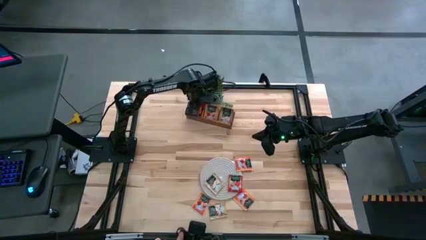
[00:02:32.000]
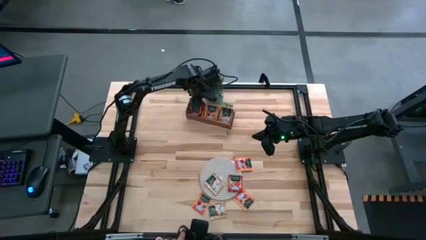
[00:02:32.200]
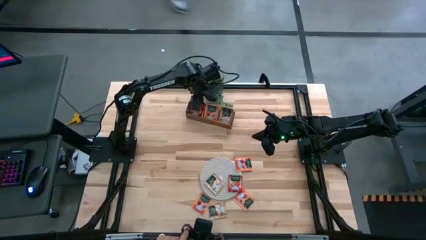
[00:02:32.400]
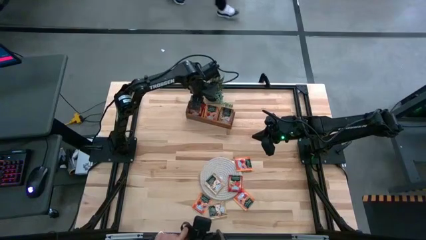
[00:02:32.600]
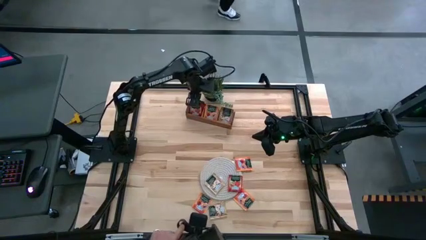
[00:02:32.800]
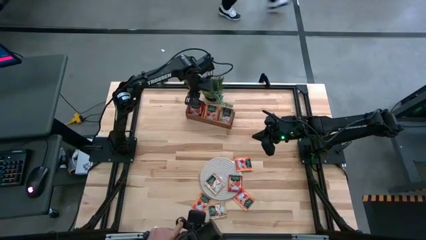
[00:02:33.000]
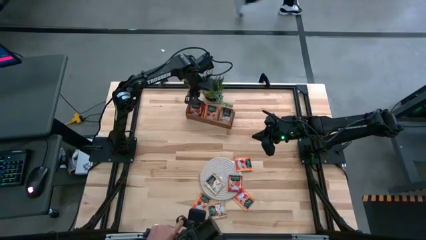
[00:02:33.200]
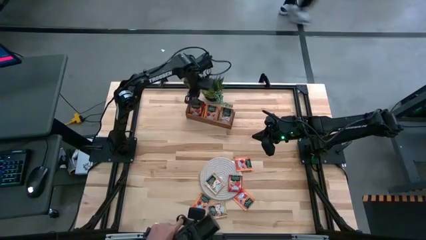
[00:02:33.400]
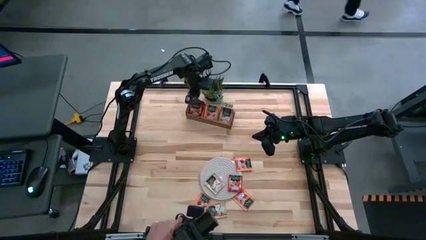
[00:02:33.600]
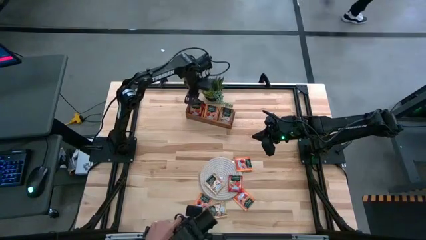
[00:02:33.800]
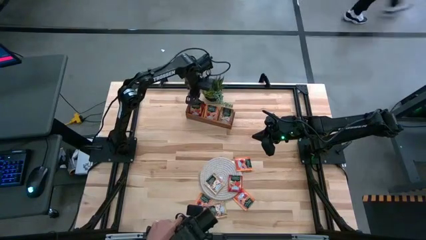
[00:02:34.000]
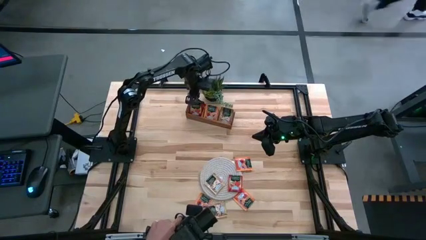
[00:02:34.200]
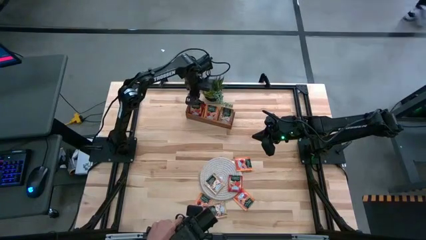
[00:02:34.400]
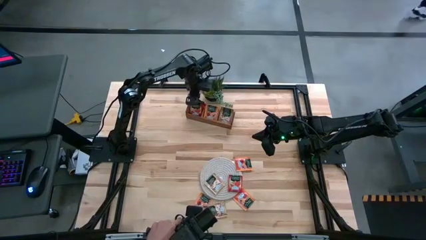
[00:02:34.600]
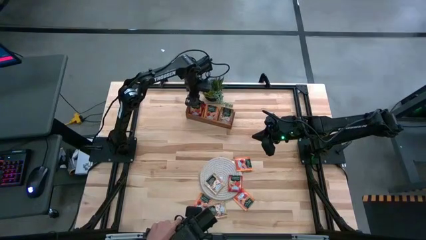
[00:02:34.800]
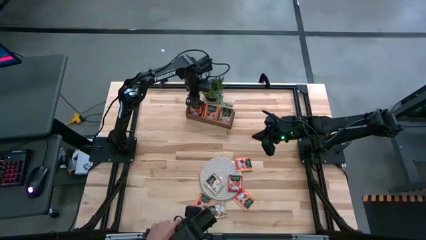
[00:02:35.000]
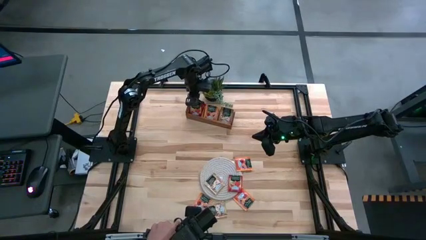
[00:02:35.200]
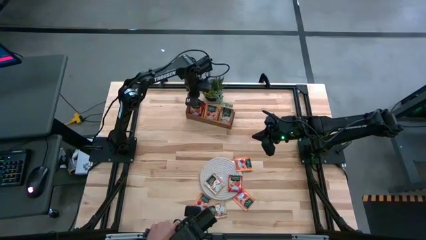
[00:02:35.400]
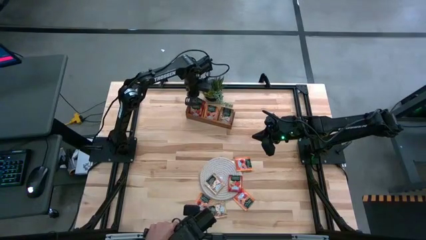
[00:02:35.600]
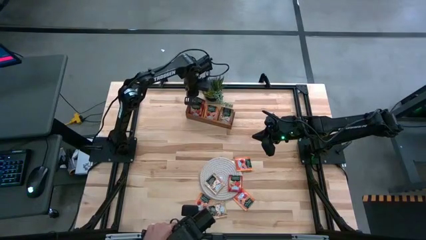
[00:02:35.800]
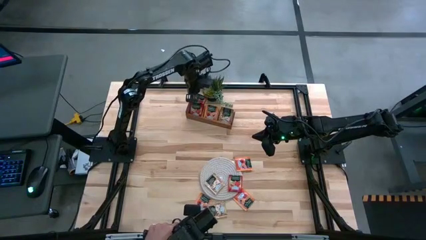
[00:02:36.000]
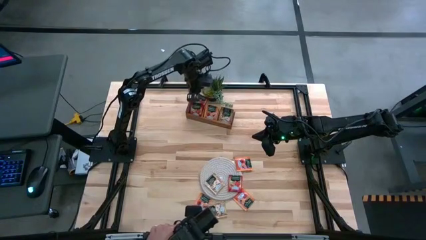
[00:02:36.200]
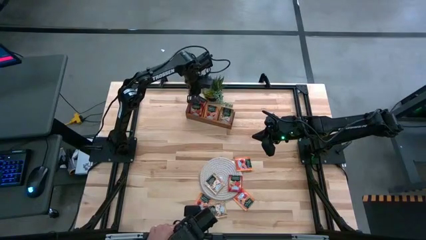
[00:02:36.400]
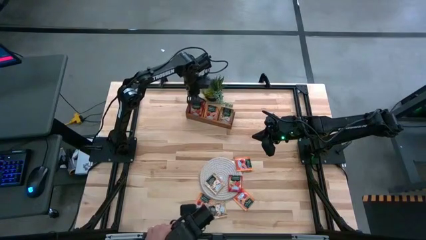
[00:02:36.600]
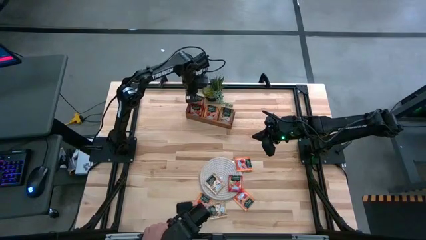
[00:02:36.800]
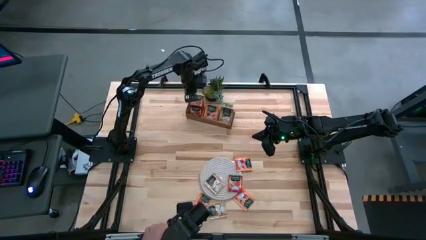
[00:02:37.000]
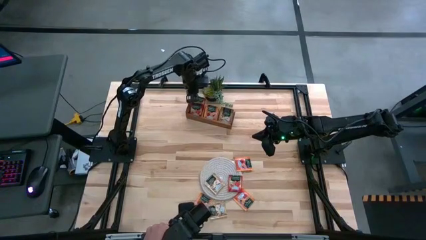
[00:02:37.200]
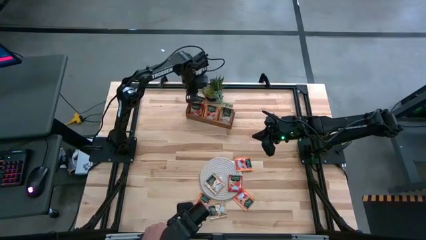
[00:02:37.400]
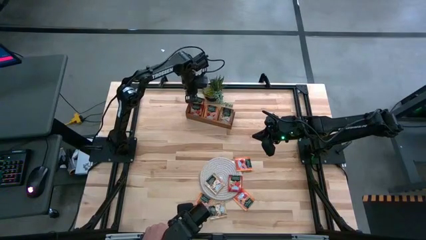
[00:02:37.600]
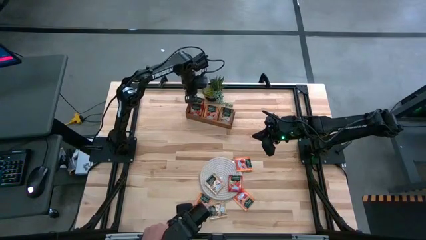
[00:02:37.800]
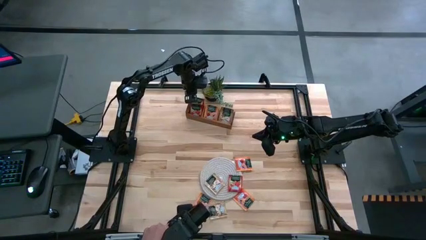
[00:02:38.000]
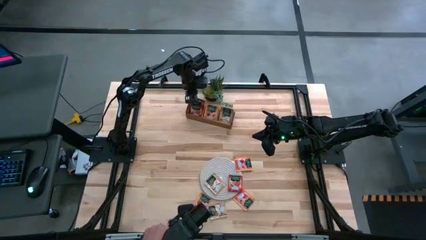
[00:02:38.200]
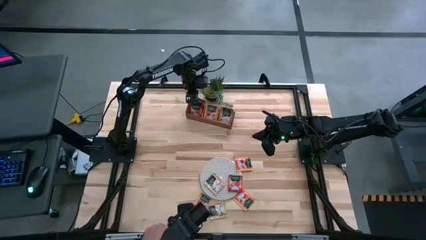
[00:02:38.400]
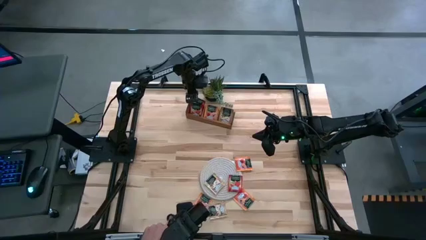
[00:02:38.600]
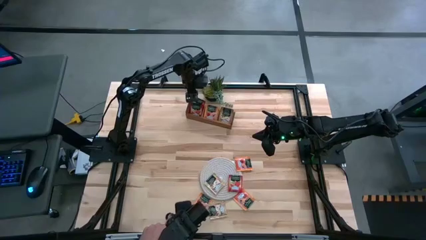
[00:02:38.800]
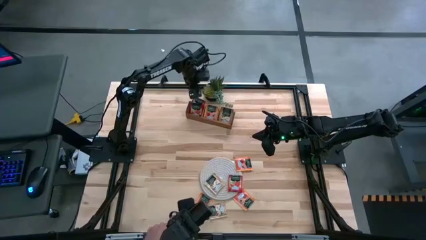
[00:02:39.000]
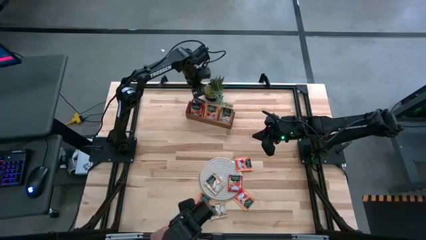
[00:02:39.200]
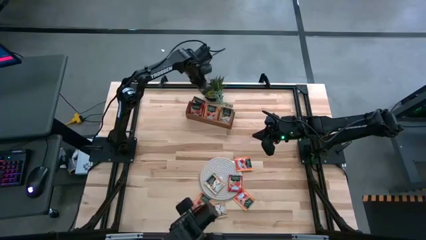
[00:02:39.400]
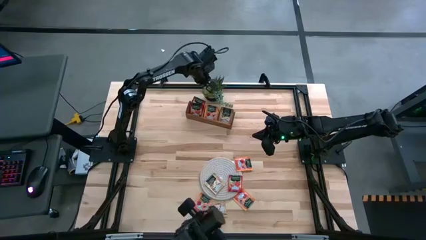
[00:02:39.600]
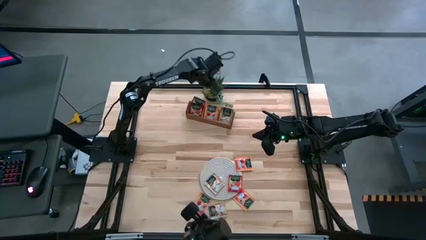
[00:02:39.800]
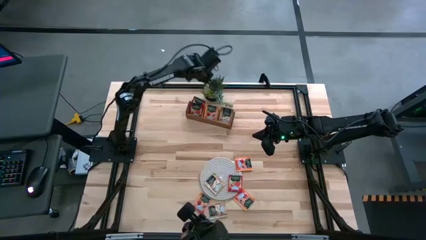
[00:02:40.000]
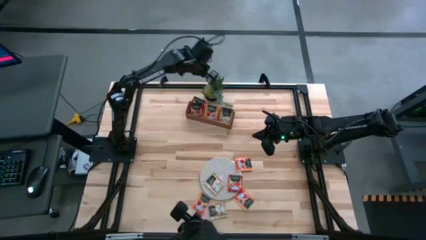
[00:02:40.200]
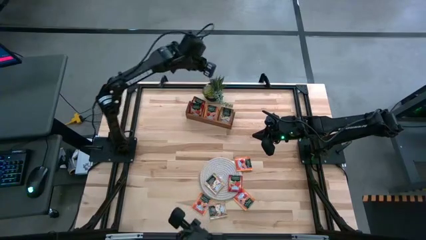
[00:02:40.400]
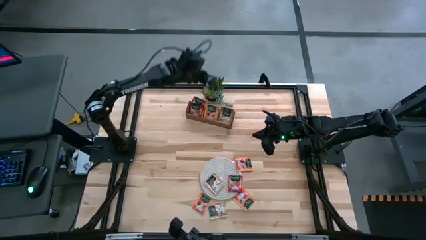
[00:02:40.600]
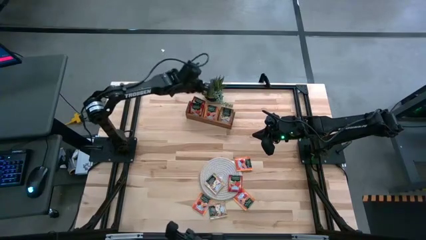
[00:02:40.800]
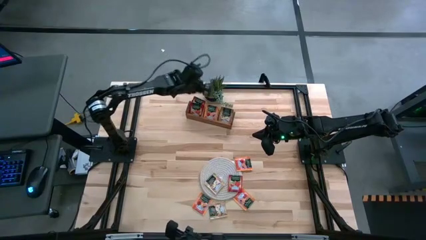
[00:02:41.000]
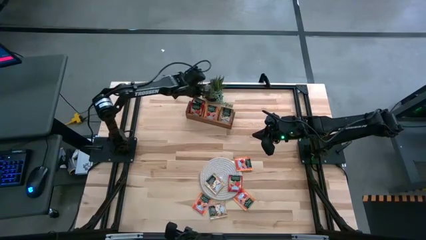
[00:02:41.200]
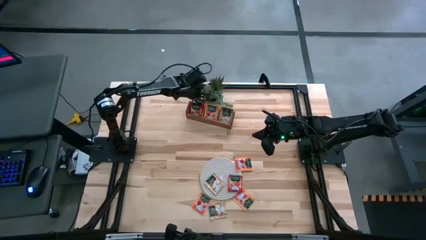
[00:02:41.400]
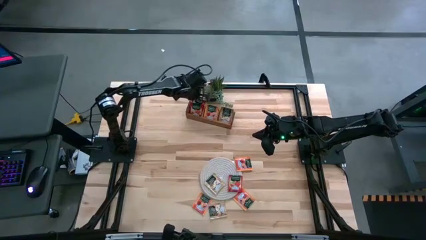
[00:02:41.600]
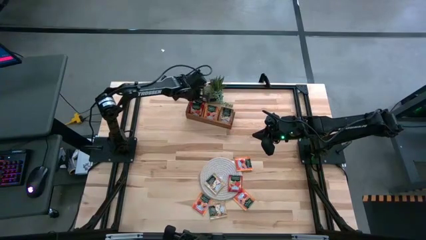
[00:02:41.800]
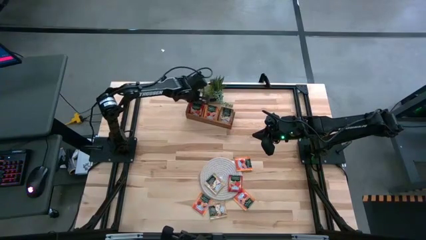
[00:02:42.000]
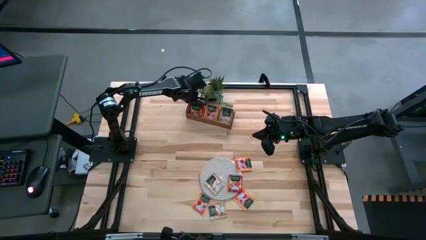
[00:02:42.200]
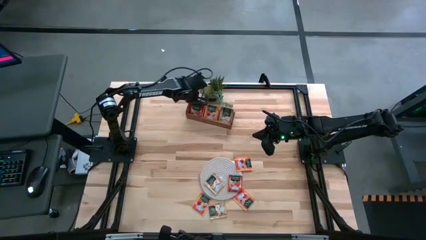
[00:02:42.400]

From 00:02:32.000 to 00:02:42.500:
Task: Pick & Place Tea
Adjust the red tea bags in the left section of the wooden organizer

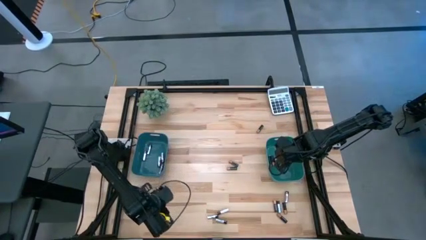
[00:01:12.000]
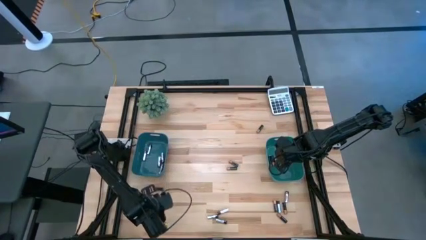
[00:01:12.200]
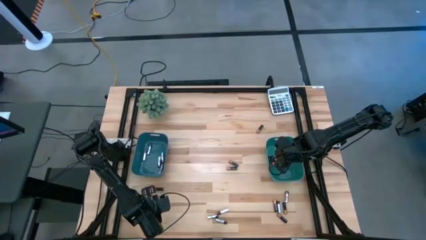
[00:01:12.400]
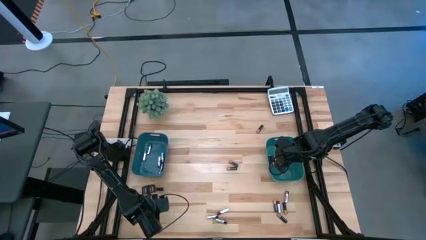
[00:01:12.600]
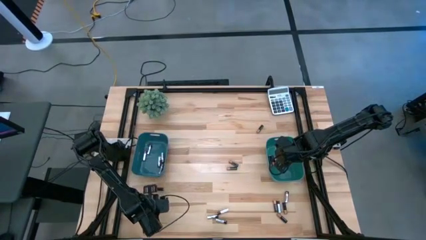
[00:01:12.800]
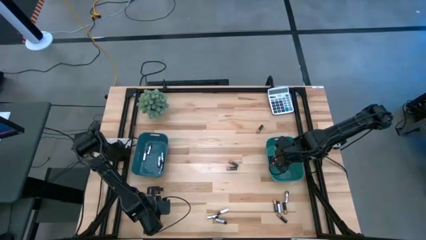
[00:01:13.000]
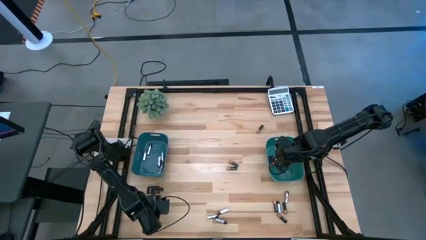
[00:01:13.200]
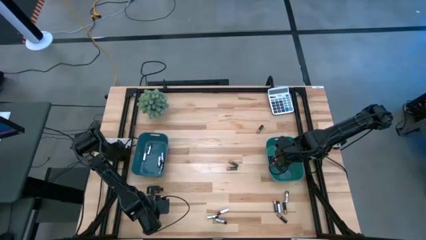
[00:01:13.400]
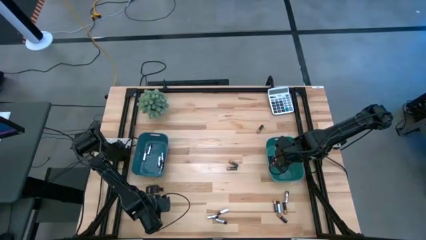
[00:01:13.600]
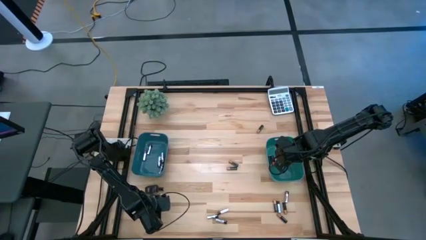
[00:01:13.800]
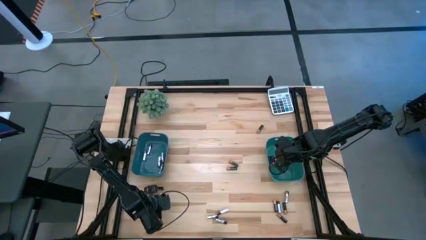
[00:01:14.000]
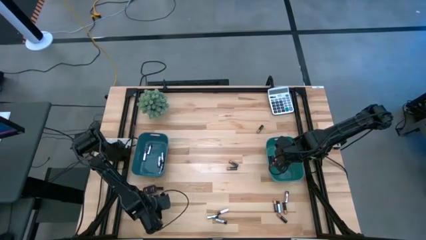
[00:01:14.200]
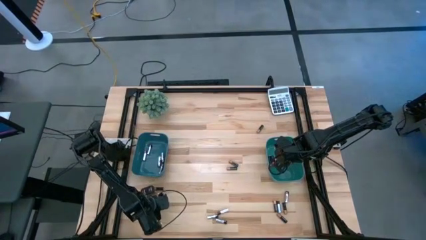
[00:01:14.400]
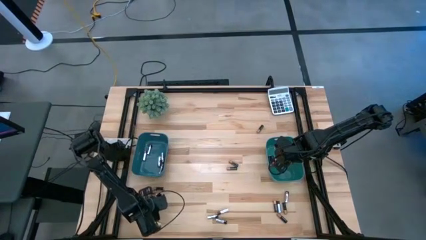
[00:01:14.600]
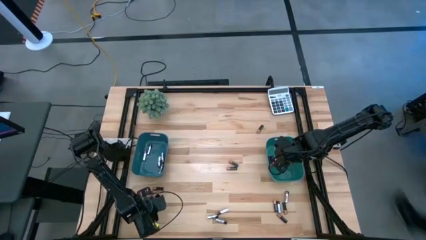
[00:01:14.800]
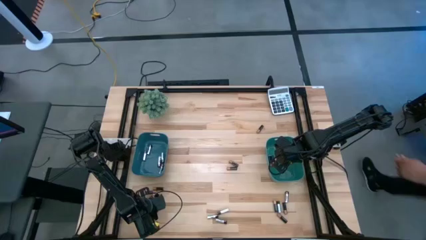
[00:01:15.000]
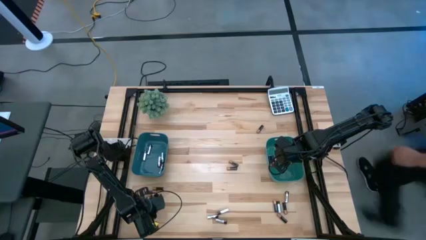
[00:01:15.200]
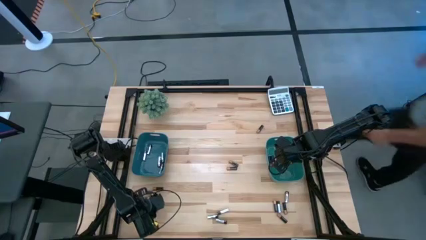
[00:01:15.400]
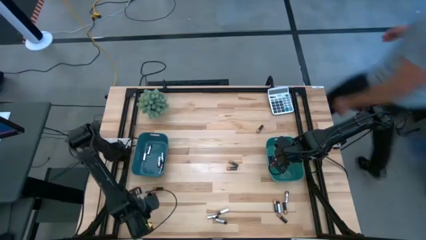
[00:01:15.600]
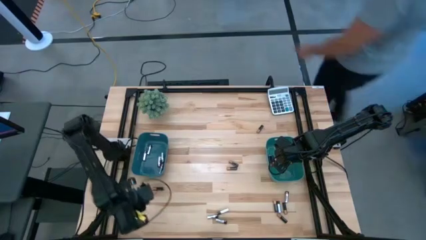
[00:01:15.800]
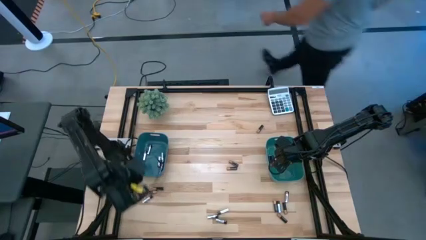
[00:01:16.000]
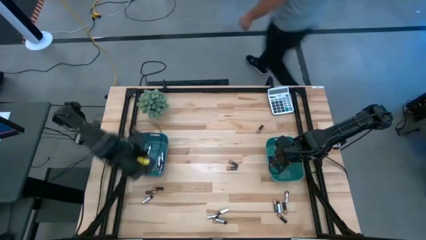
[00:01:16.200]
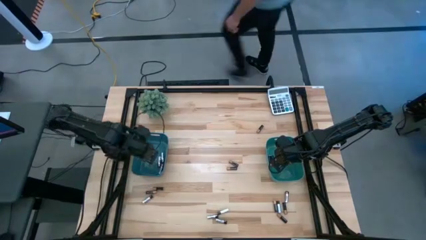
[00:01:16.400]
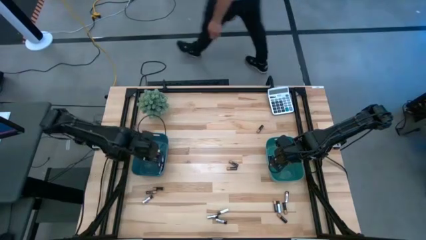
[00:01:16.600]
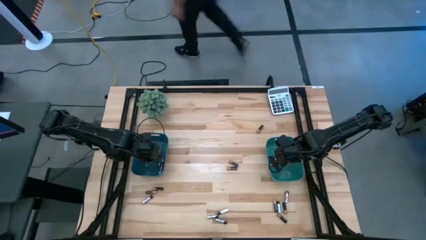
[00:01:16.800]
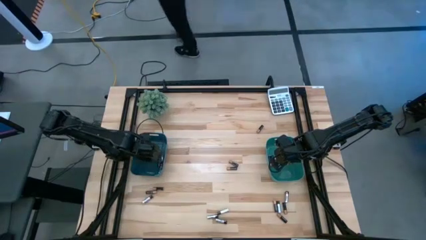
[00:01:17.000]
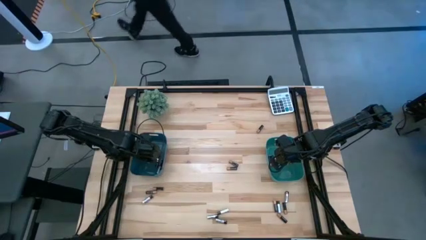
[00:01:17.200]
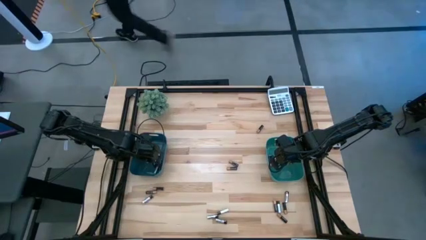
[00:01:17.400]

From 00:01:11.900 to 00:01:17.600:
Task: Sort batteries
Put the silver battery into the blue bin
